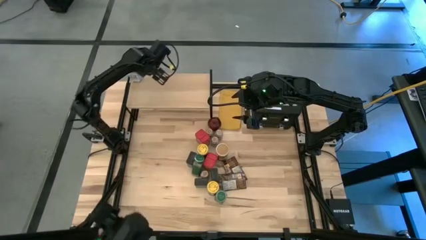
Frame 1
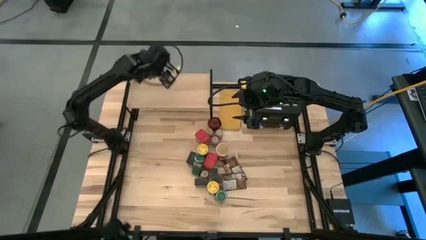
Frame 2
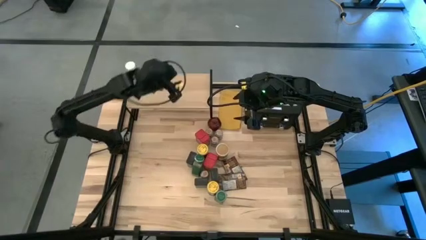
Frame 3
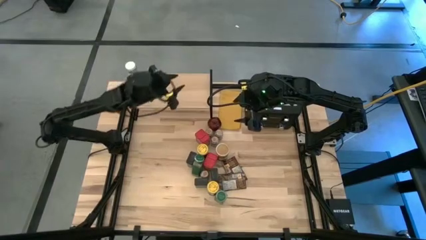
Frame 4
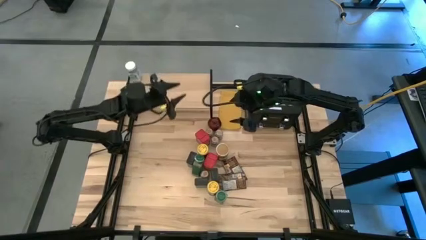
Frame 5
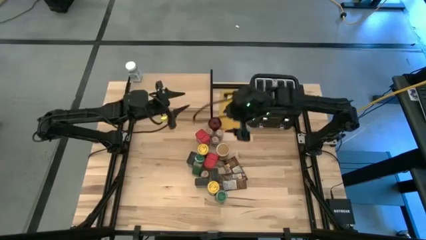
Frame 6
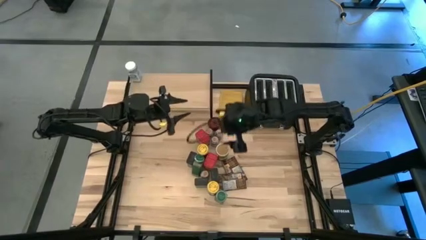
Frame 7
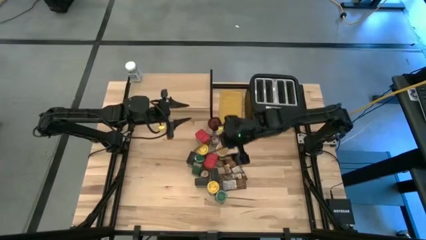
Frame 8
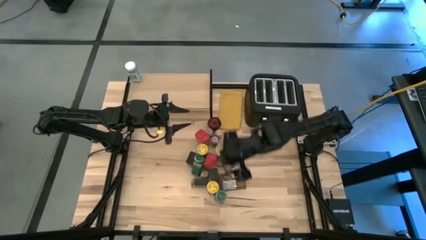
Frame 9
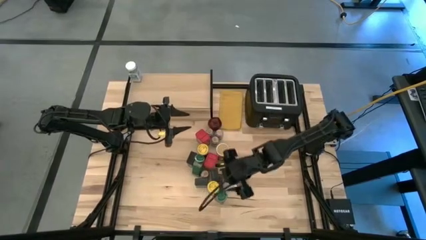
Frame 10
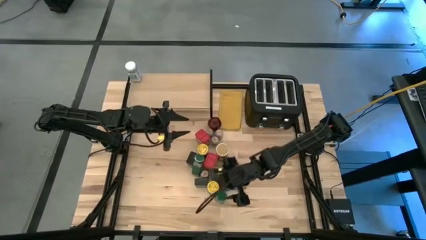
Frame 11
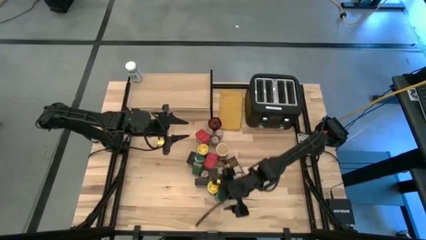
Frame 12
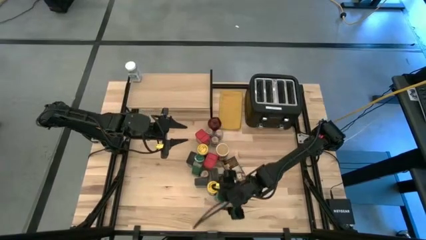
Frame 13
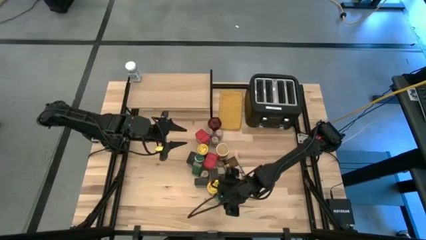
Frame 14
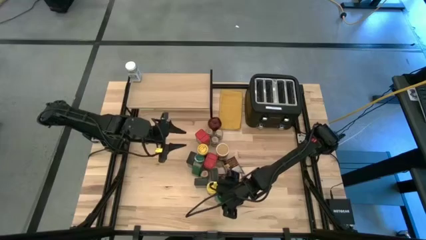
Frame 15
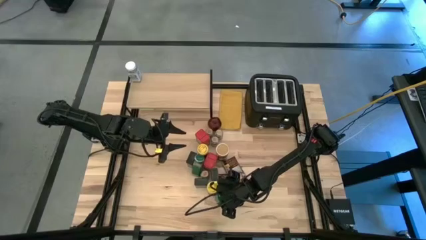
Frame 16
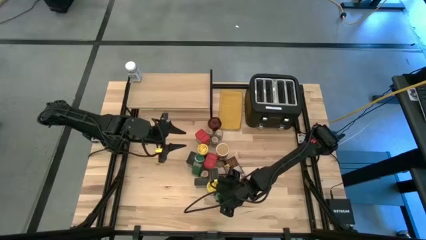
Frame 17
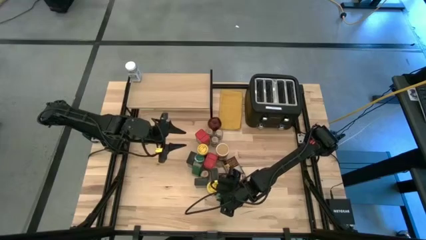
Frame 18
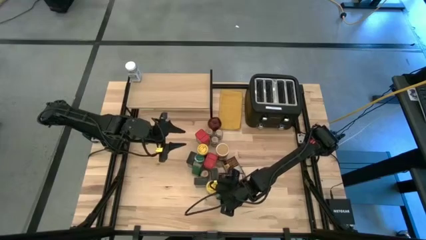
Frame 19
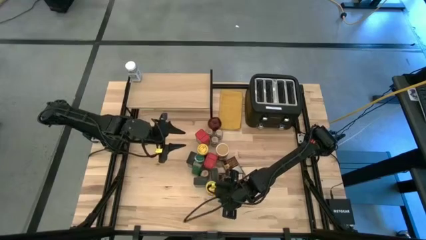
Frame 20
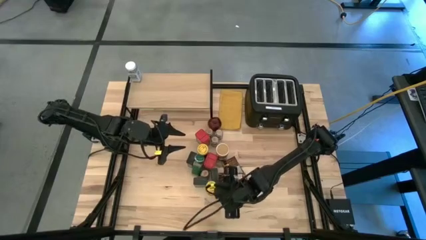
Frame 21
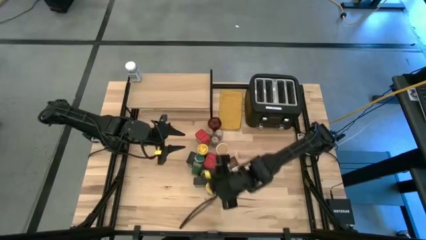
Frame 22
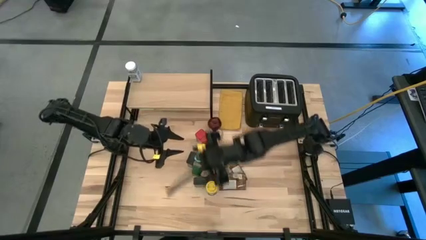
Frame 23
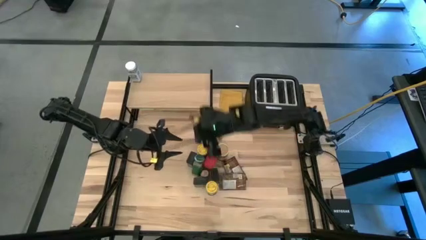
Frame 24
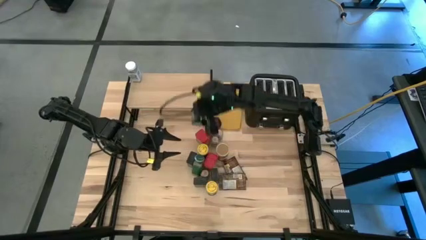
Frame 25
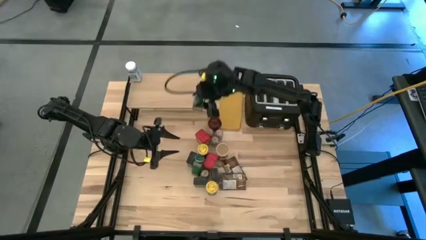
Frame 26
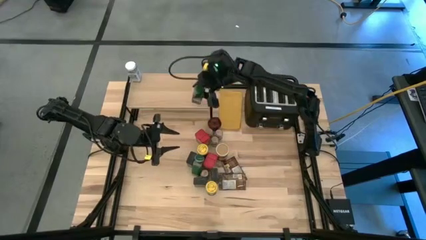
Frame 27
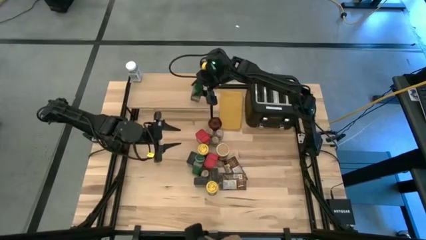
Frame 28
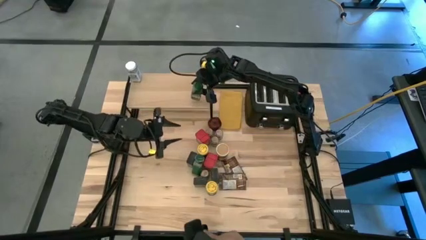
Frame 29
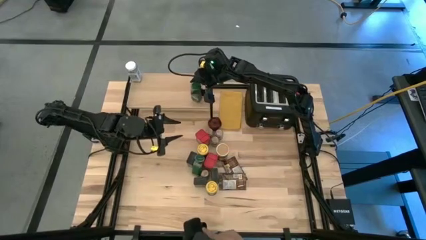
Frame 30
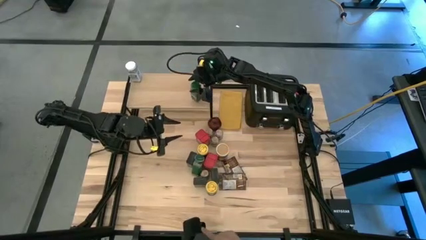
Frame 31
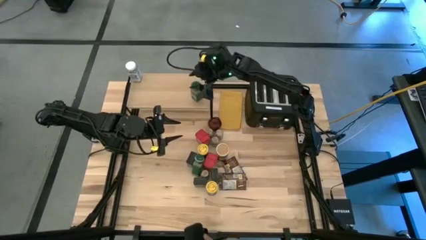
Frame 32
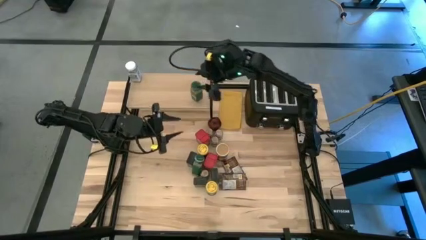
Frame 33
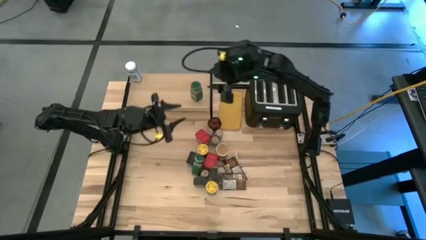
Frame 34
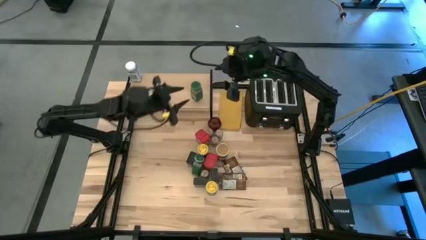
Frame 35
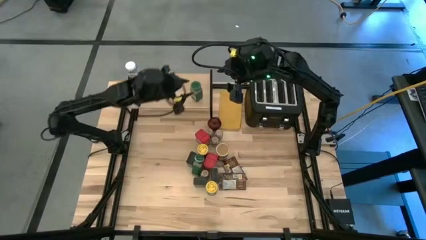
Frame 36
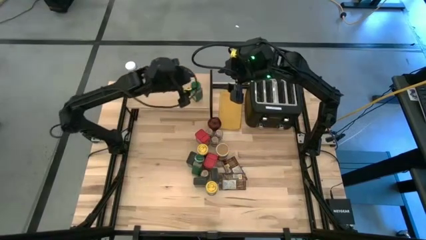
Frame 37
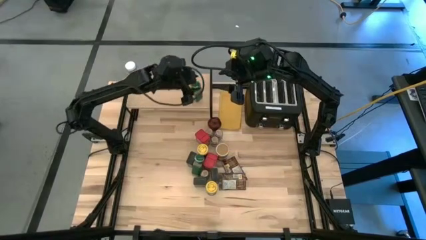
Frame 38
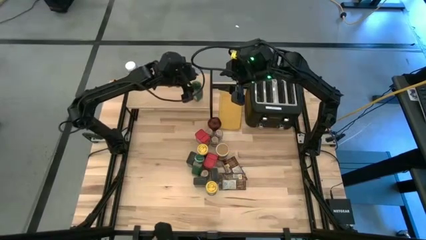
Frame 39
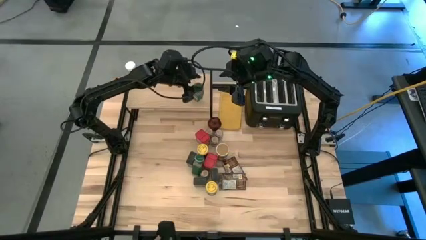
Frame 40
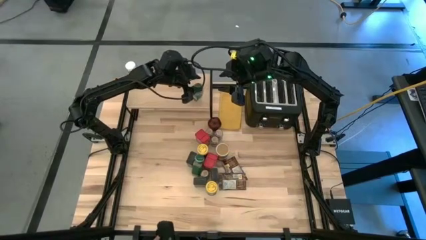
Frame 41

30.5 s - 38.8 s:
Task: Shelf spices
Put the bottom green seasoning bottle on the shelf

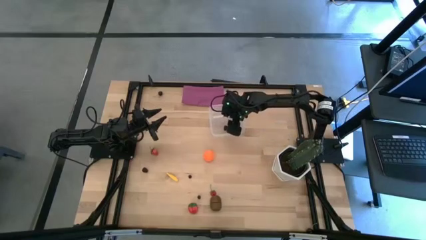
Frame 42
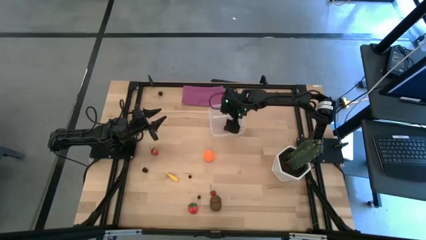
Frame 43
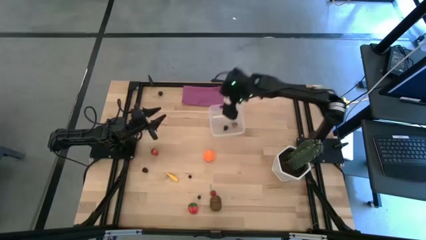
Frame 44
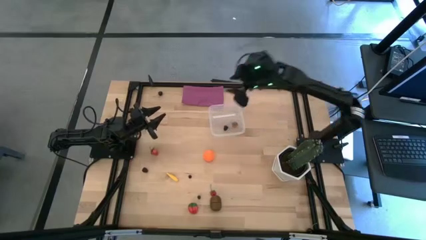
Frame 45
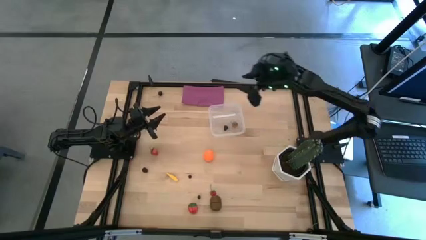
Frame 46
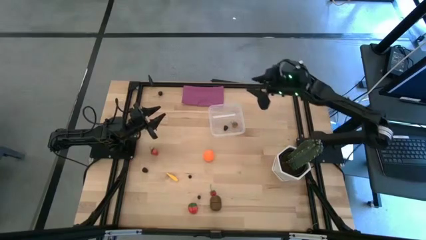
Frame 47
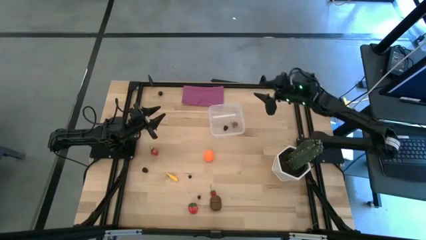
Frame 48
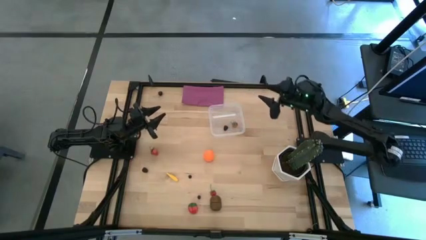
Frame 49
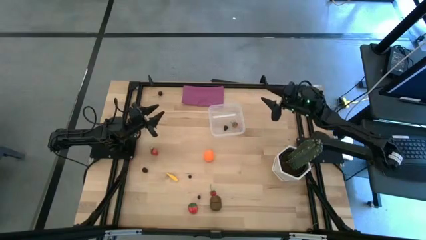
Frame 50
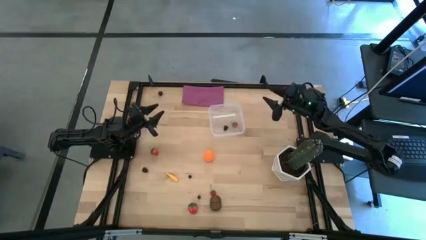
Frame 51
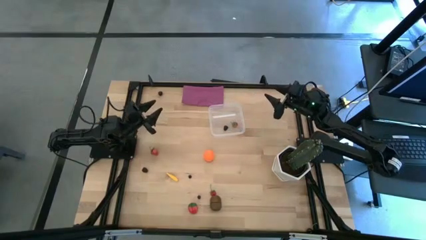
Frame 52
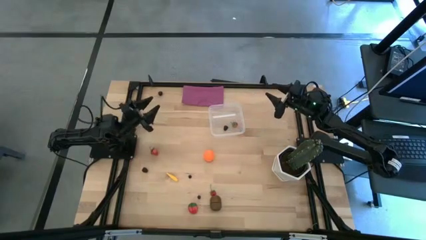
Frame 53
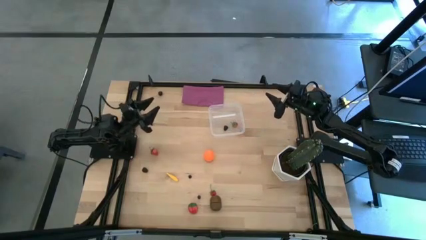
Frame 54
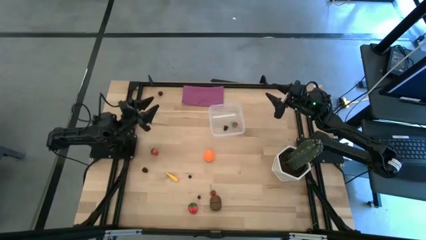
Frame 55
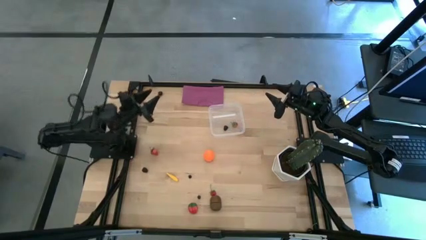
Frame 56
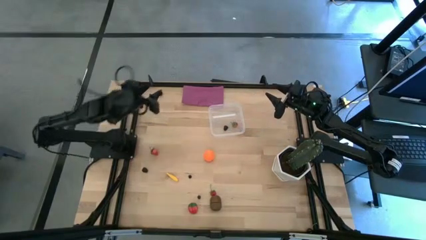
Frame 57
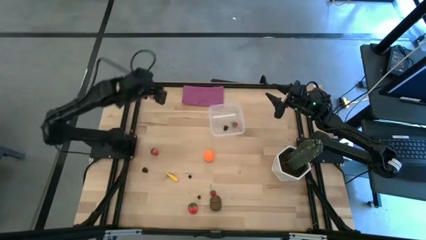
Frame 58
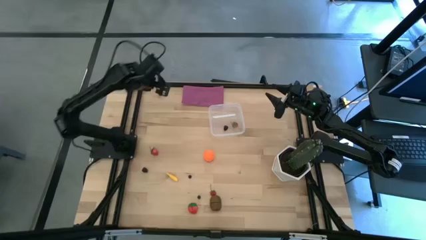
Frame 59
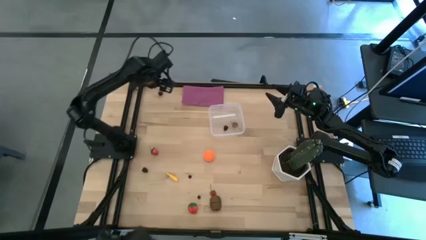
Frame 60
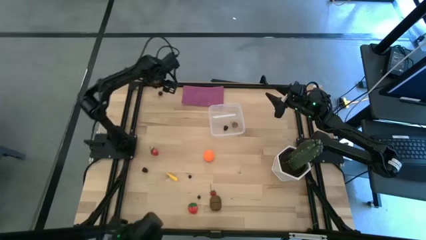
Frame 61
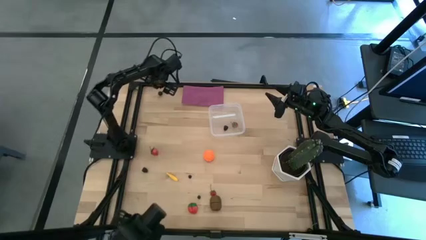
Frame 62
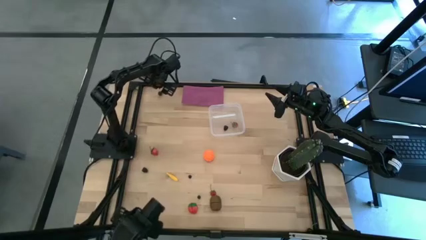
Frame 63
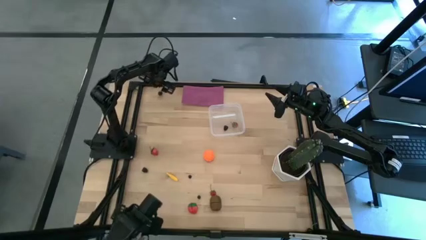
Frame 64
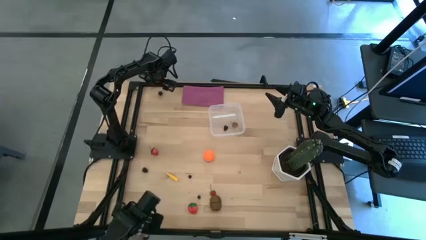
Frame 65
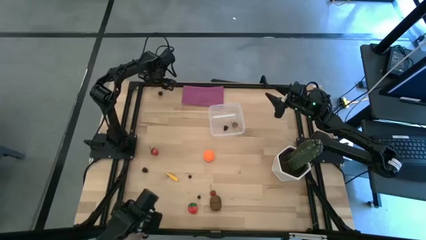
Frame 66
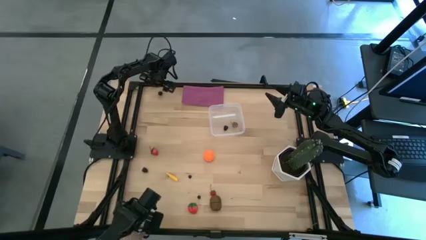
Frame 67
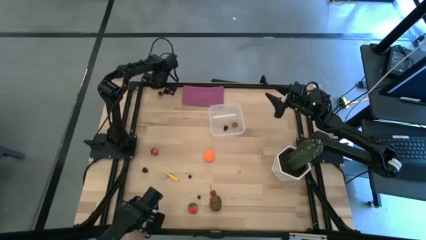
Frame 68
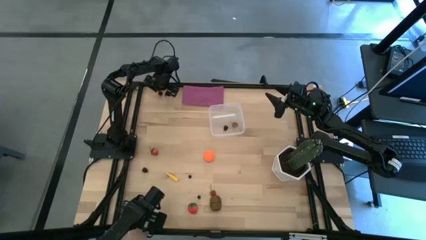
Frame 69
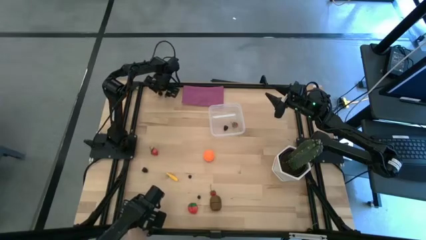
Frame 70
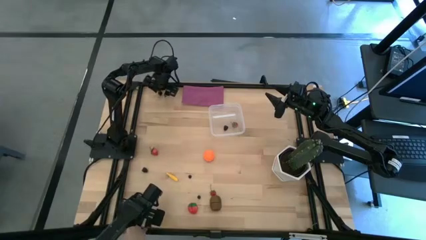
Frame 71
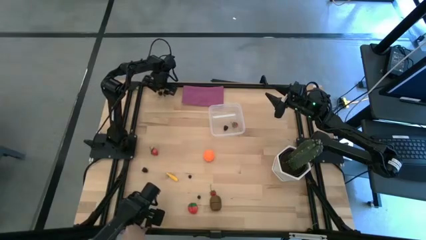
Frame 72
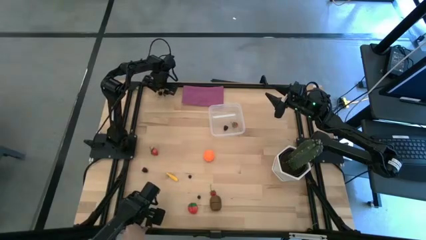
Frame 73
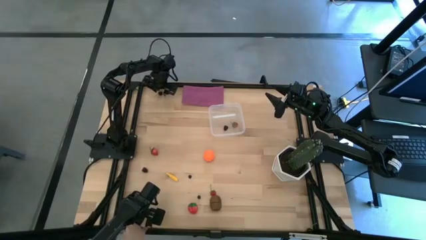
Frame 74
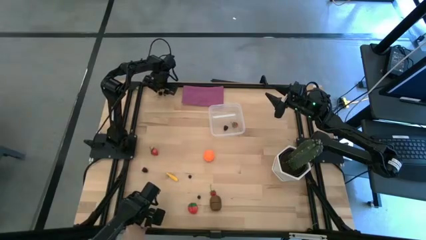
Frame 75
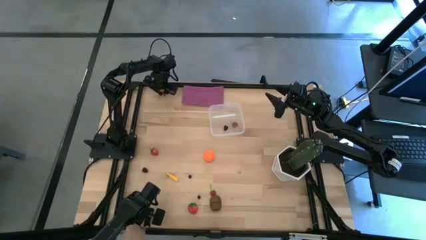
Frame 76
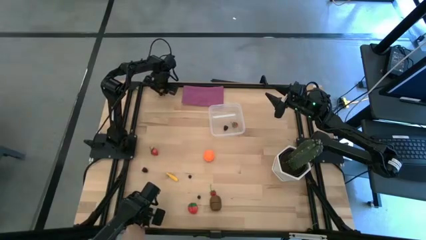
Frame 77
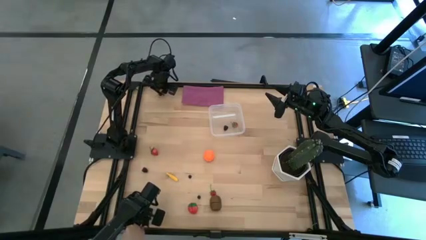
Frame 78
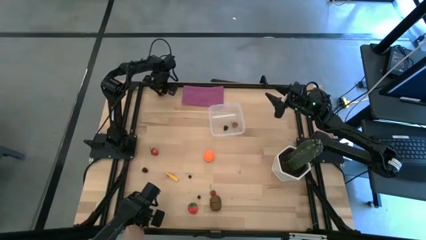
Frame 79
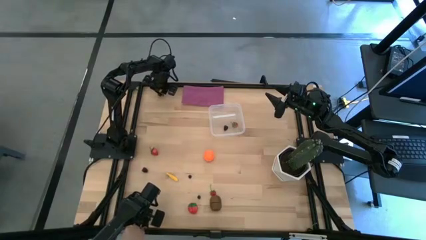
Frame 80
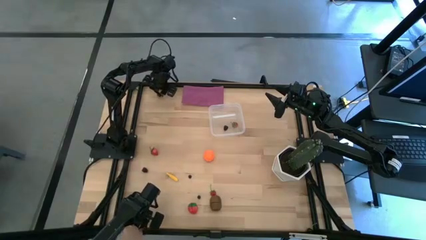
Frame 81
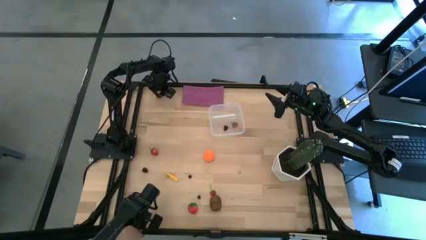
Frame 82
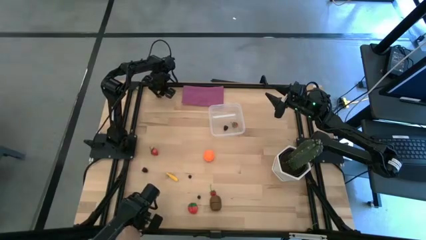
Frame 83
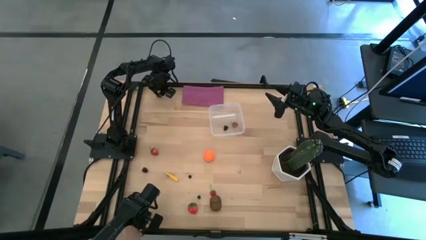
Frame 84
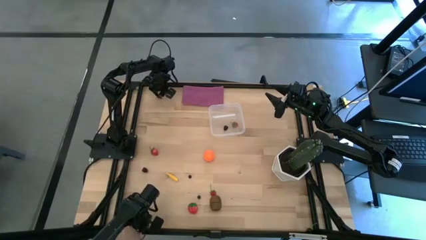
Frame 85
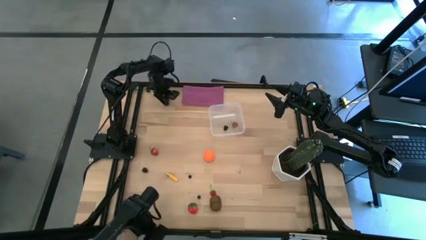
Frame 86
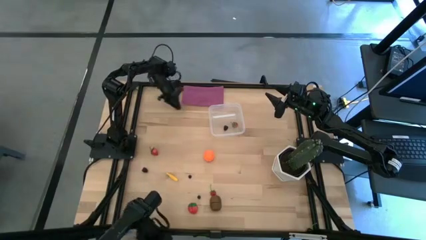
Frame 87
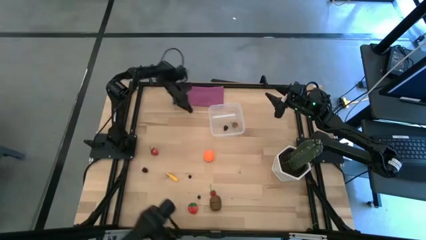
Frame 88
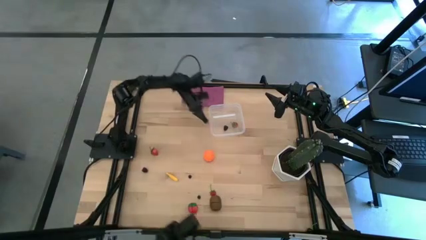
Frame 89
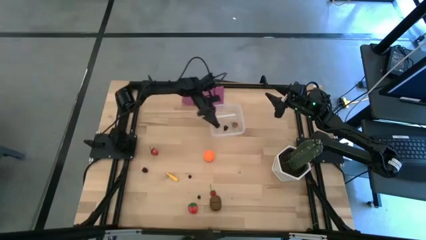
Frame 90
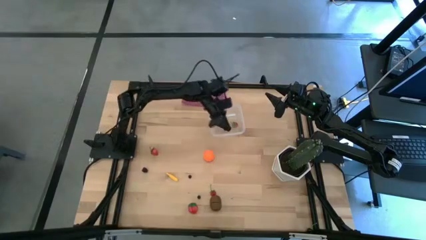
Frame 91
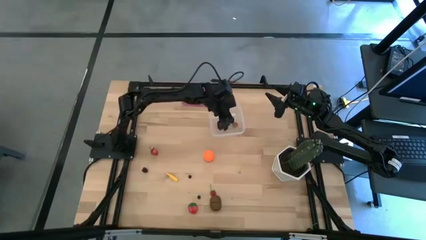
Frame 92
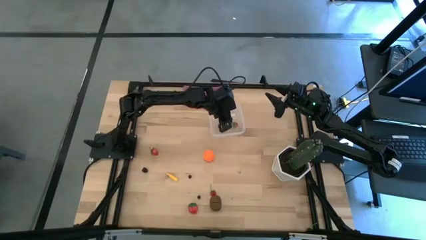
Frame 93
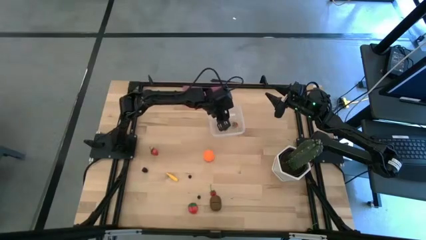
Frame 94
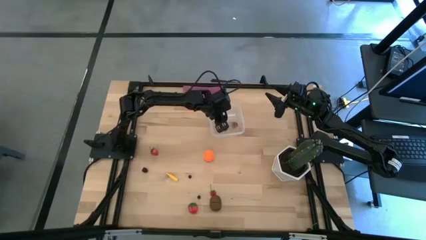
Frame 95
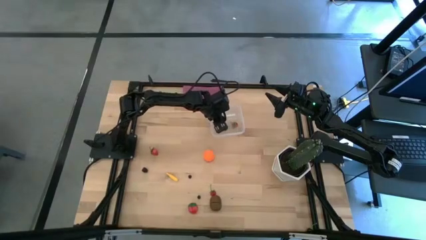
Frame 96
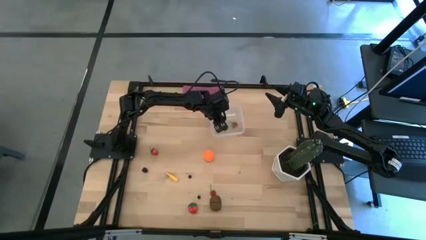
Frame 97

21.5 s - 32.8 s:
Task: Pick and placing Produce into tupperware
Put the black cherry into the transparent bin
